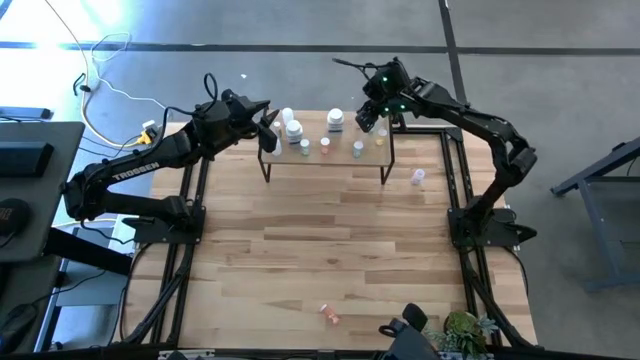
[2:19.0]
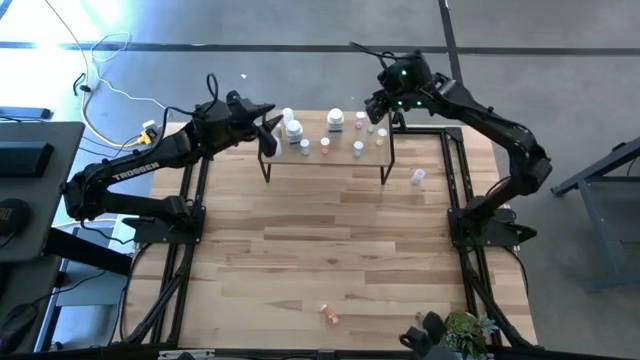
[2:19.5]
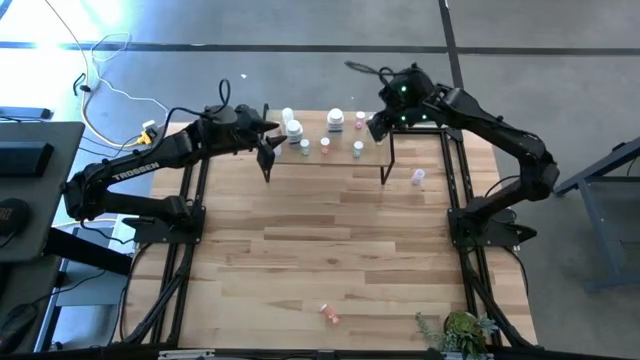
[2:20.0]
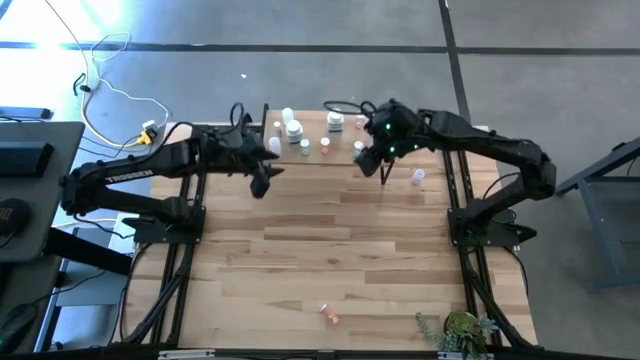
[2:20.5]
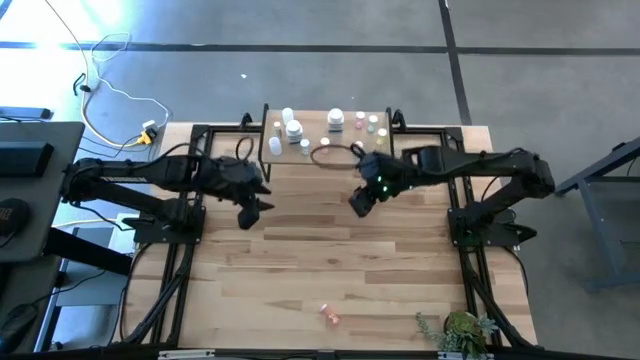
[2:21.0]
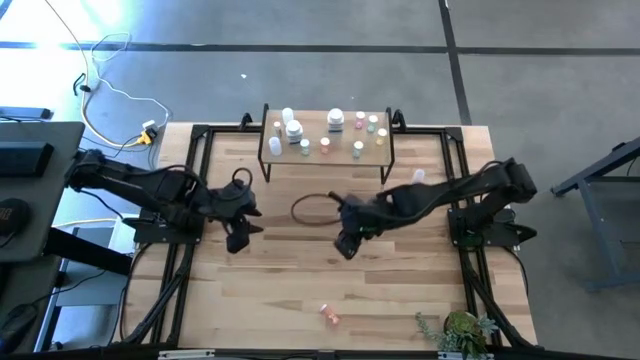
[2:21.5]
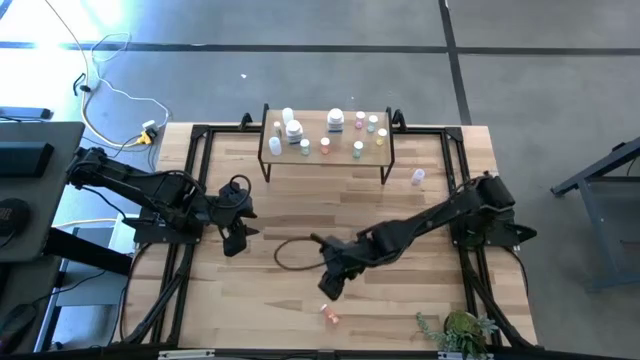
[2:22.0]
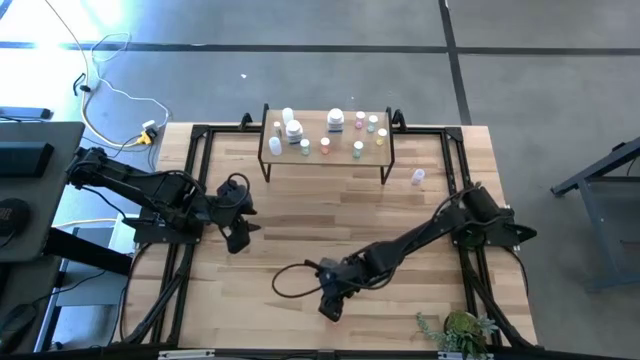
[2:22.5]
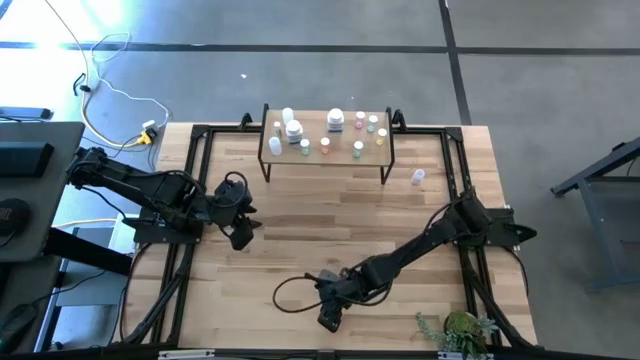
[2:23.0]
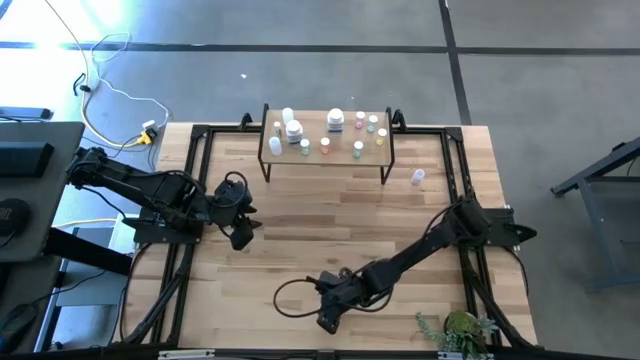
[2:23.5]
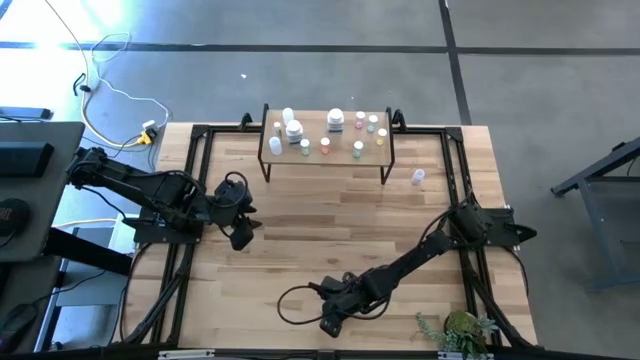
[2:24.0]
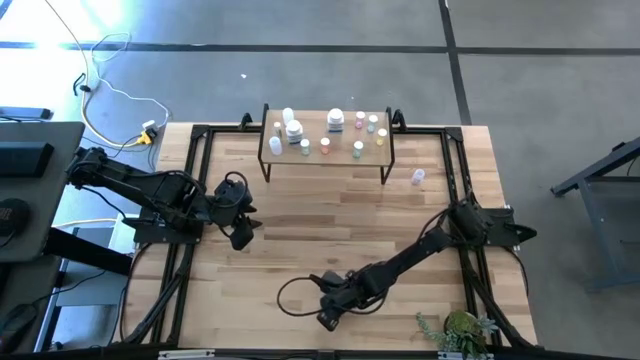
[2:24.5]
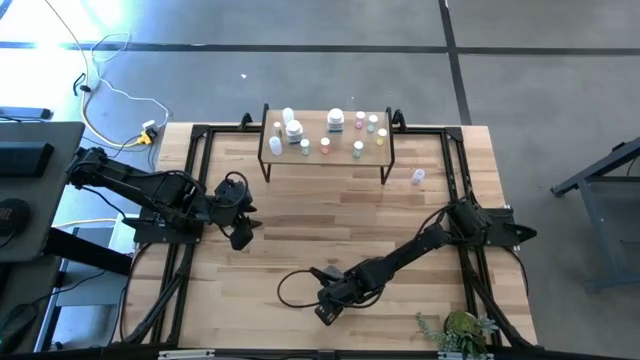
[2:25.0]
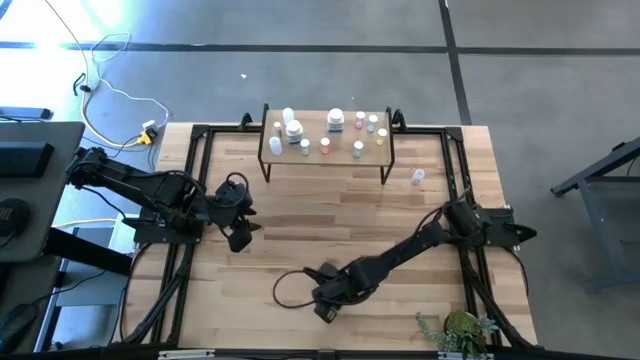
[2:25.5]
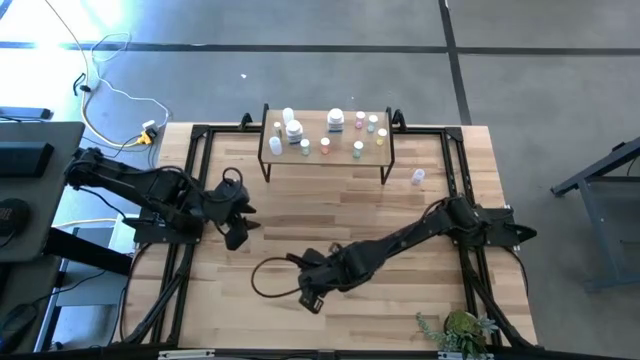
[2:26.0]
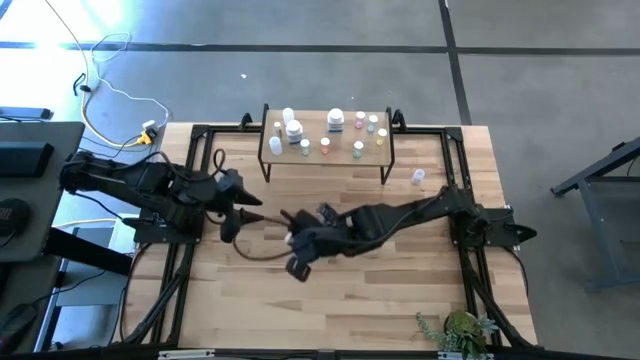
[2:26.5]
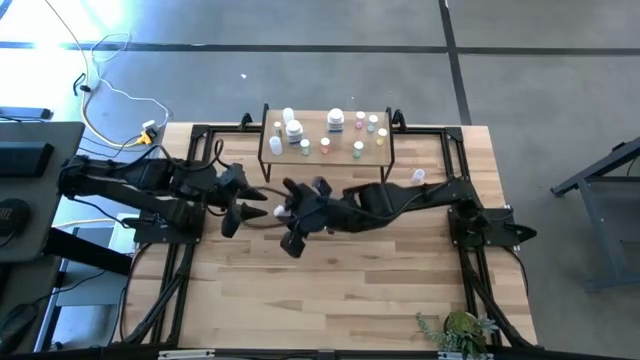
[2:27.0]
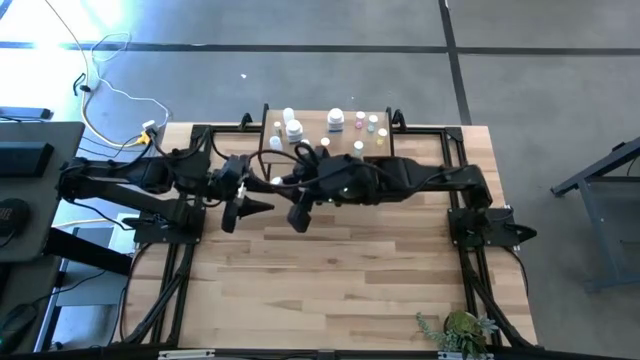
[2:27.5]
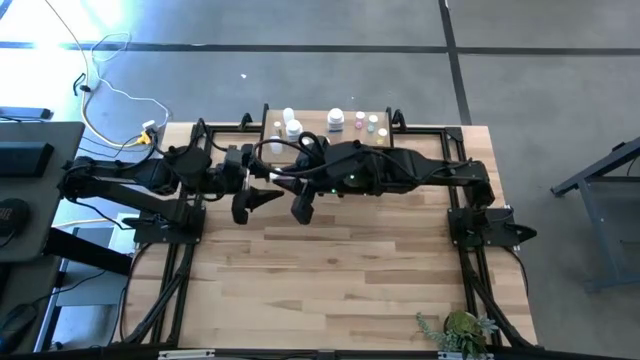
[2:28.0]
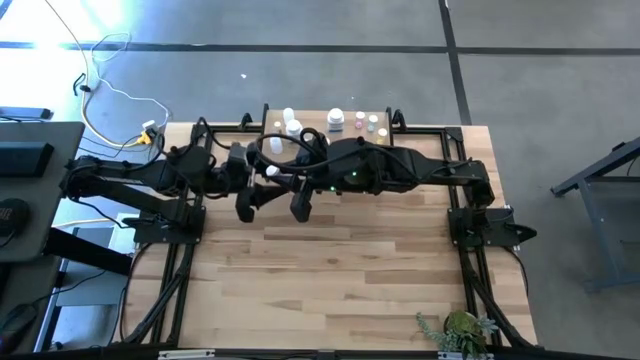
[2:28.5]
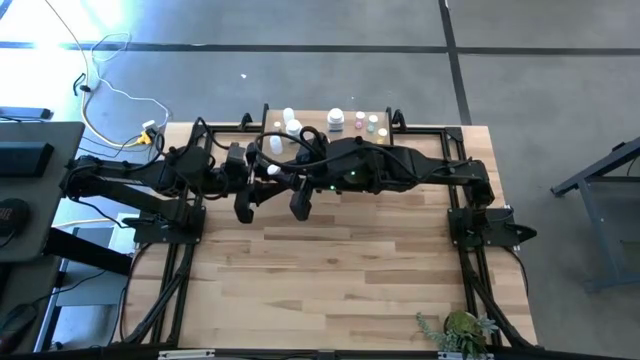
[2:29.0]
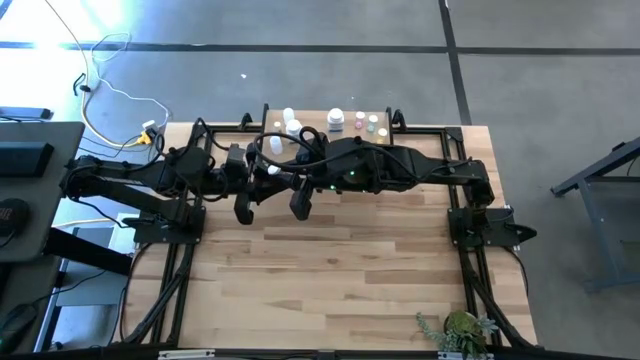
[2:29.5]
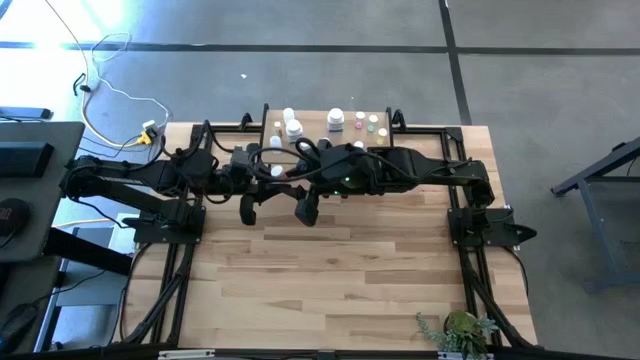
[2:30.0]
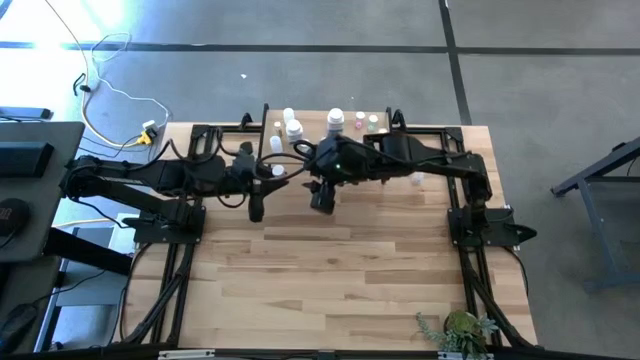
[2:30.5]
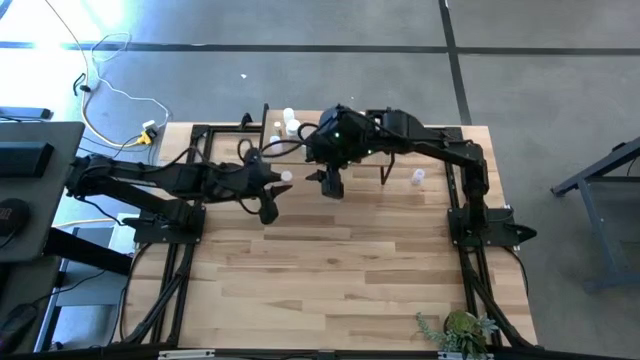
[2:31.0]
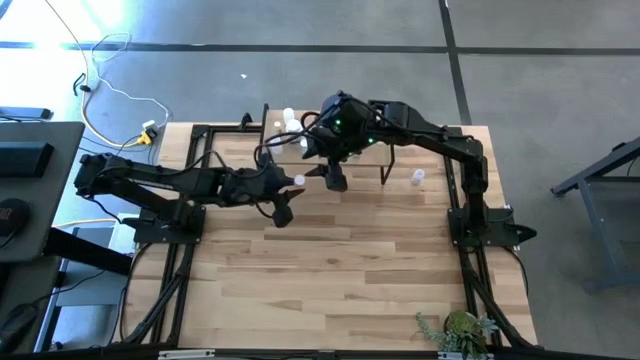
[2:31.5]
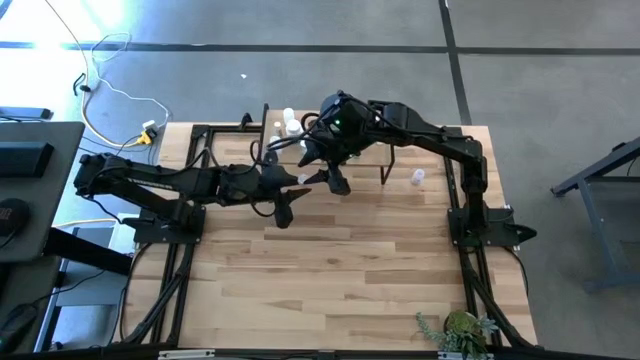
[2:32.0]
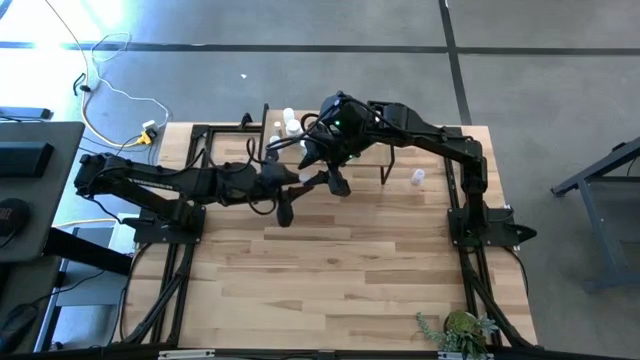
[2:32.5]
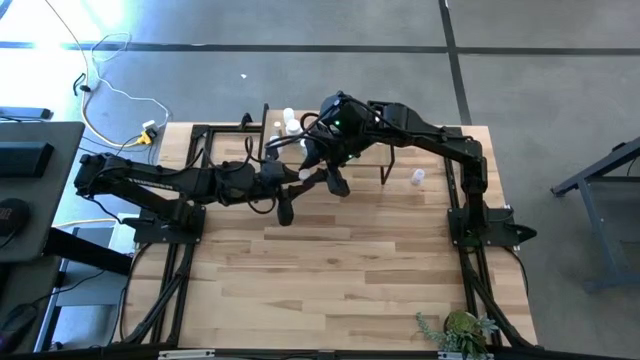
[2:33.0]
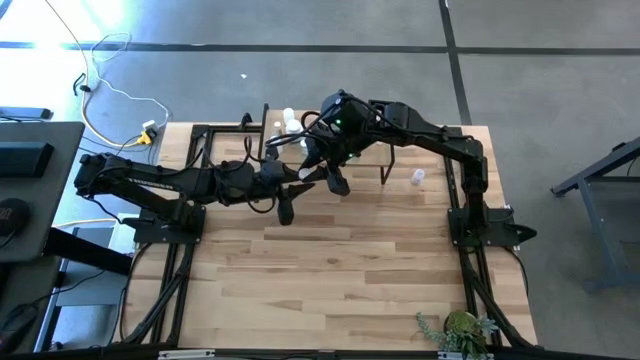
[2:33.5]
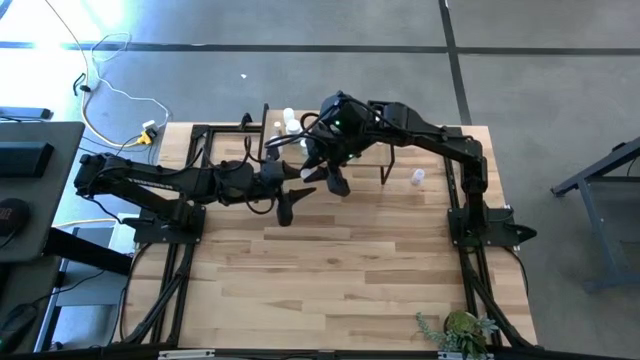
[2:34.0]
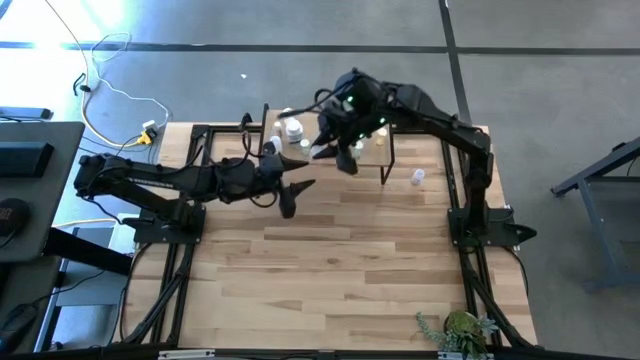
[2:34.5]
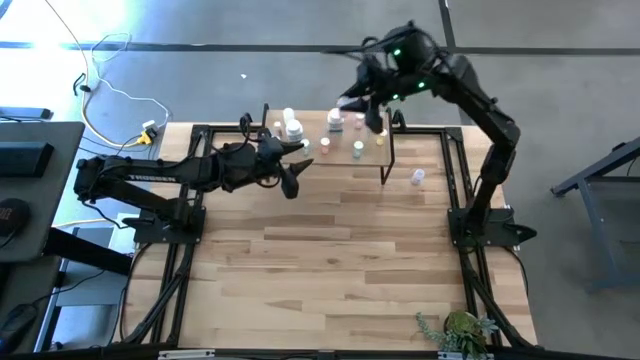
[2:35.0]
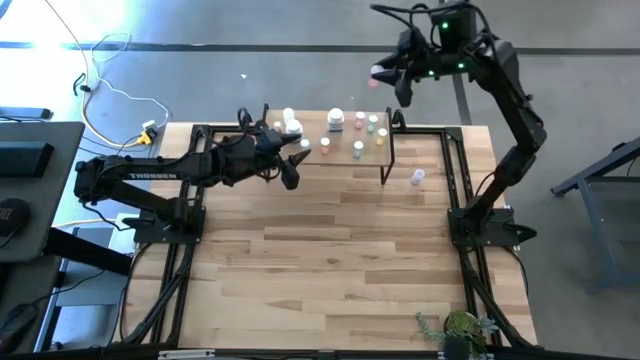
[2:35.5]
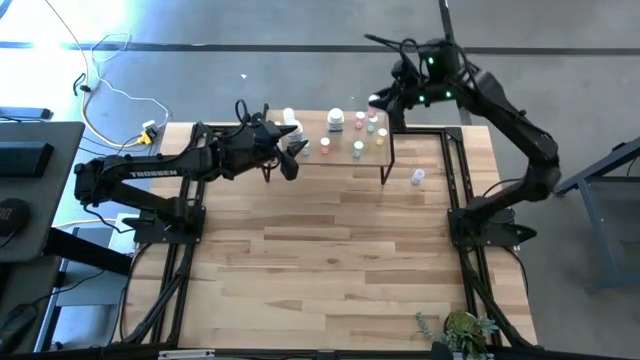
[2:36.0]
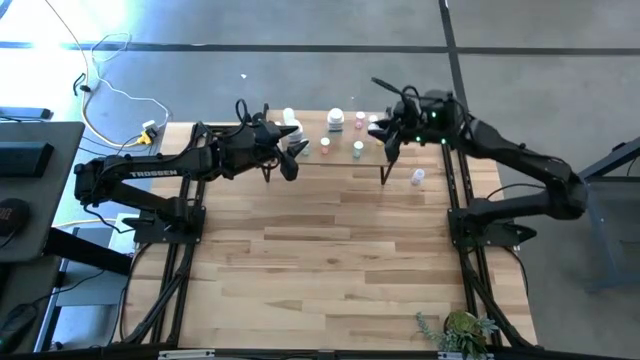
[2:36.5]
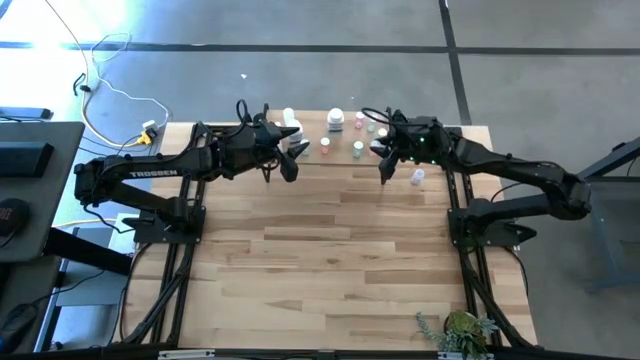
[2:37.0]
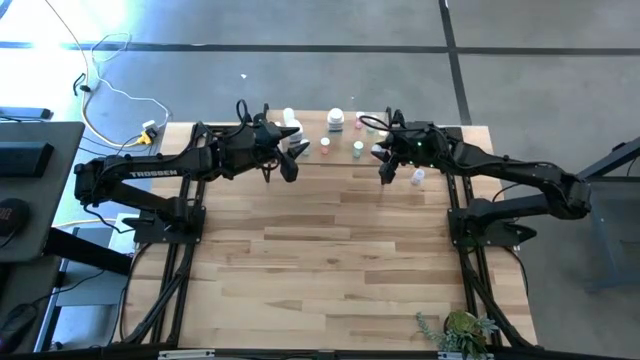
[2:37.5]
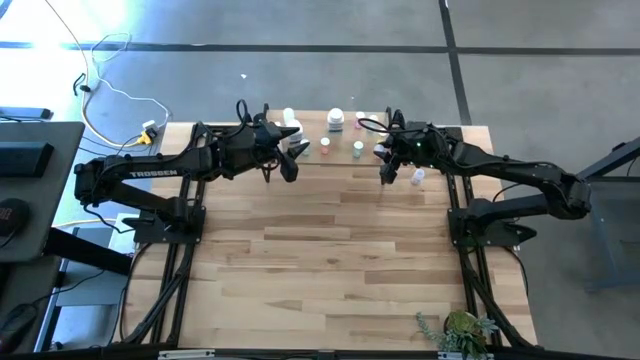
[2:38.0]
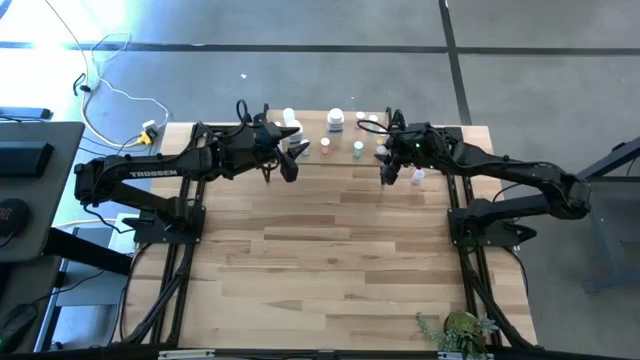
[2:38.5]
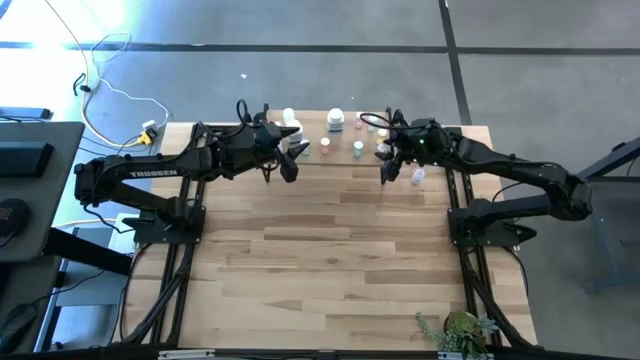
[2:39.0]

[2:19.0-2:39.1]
Task: Pick and place medicine bottles onto shelf by color
Put the orange pill bottle on the shelf
